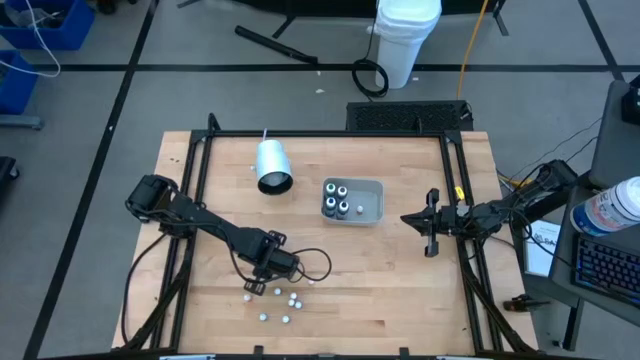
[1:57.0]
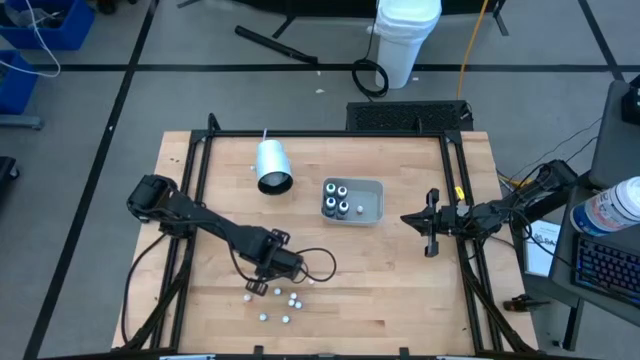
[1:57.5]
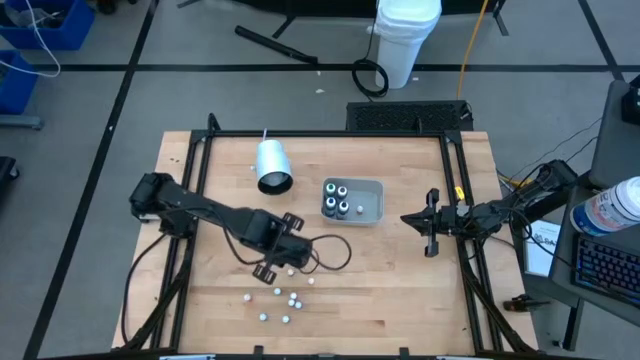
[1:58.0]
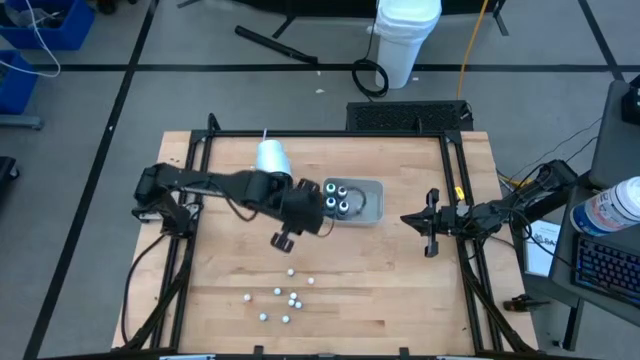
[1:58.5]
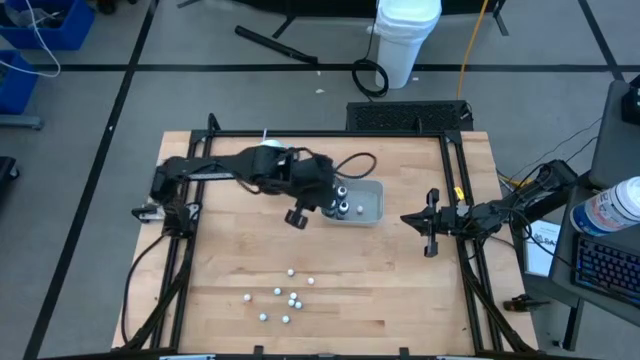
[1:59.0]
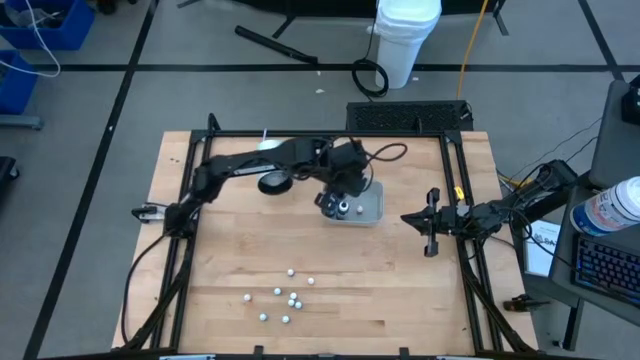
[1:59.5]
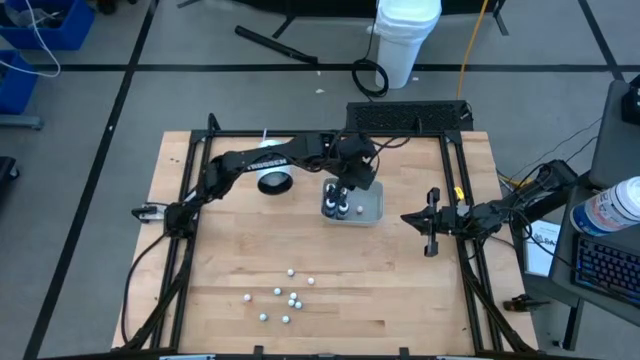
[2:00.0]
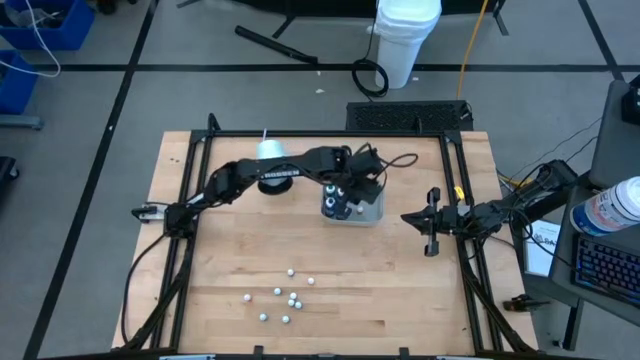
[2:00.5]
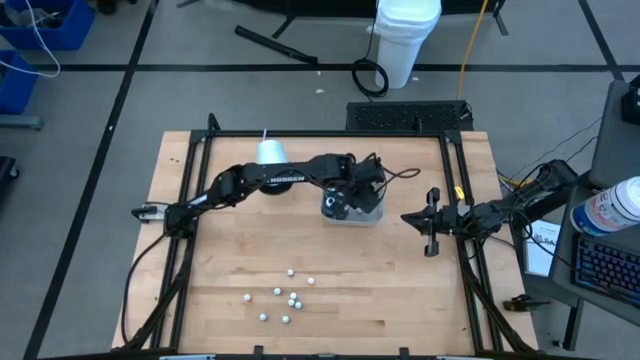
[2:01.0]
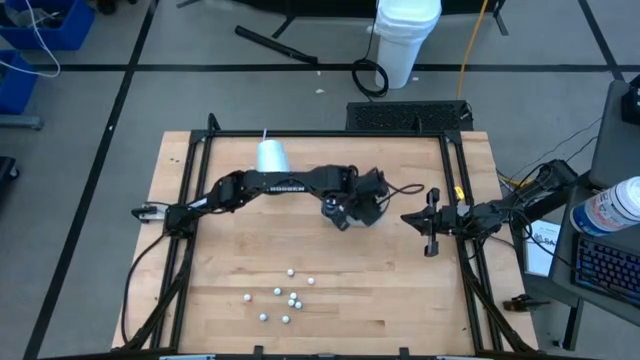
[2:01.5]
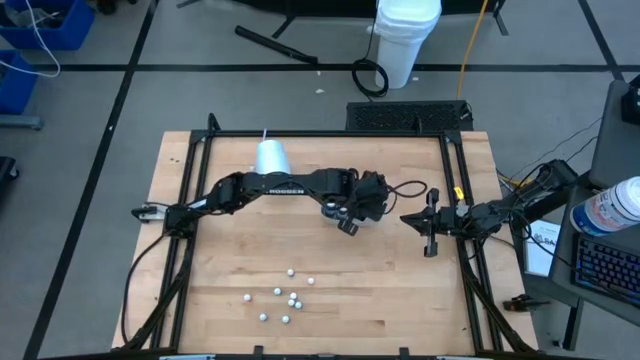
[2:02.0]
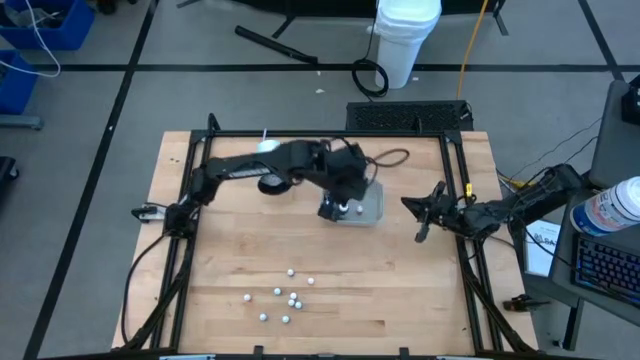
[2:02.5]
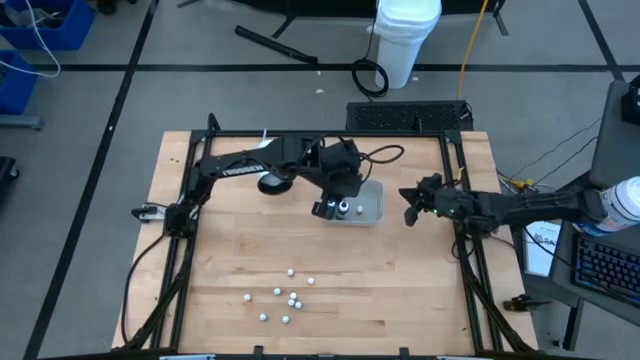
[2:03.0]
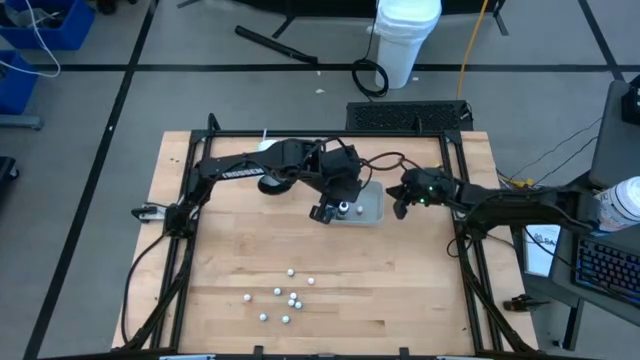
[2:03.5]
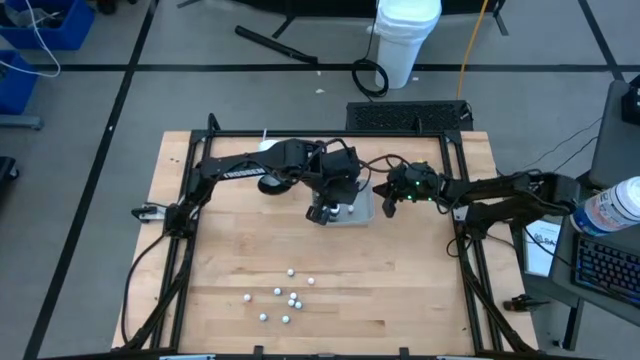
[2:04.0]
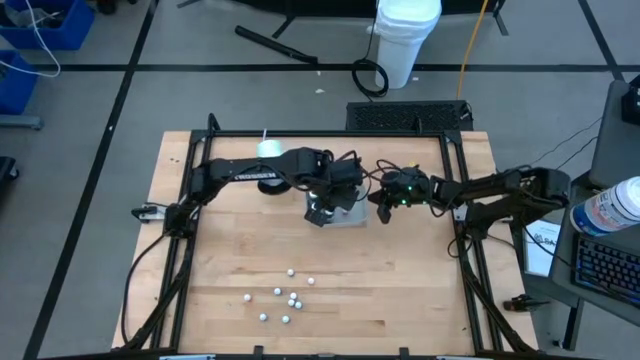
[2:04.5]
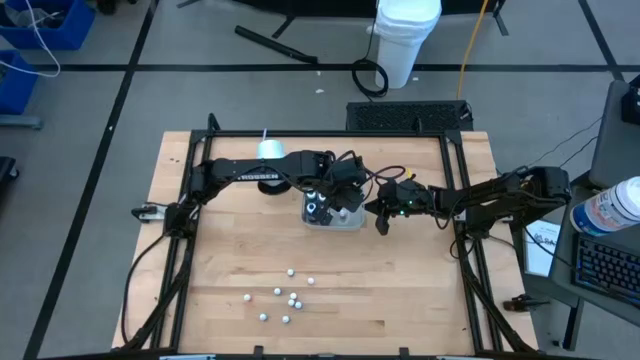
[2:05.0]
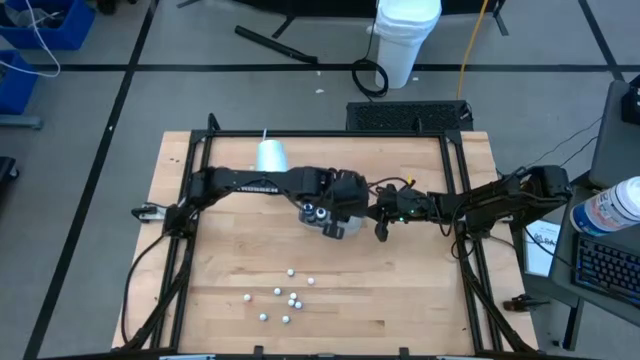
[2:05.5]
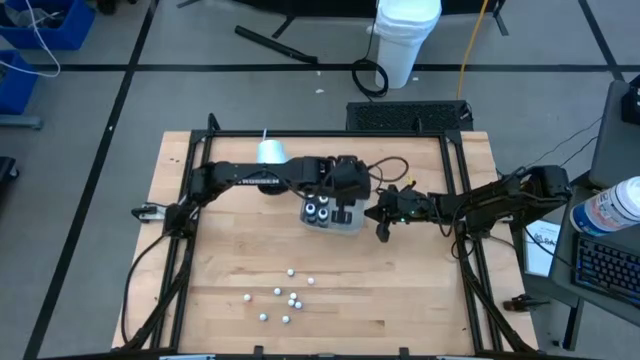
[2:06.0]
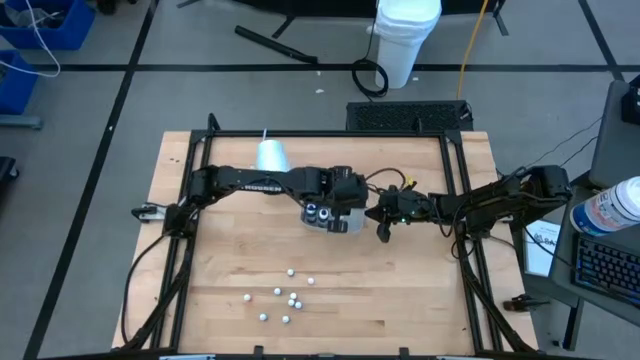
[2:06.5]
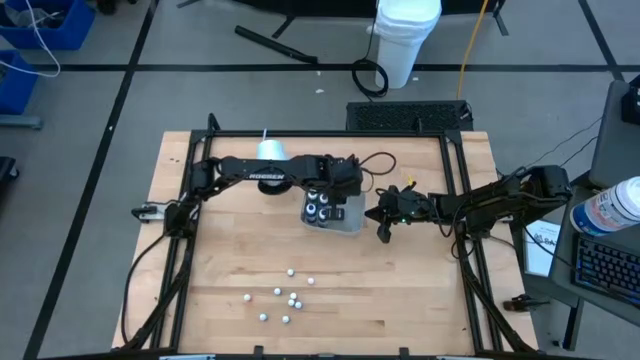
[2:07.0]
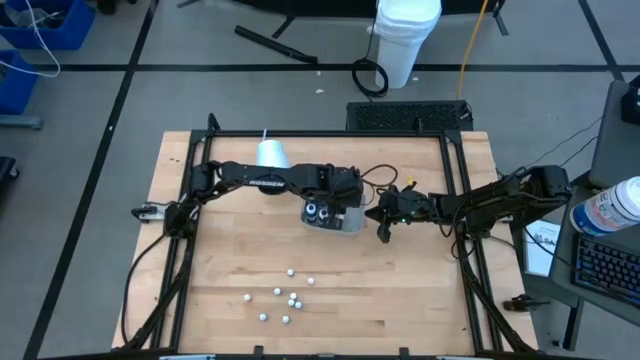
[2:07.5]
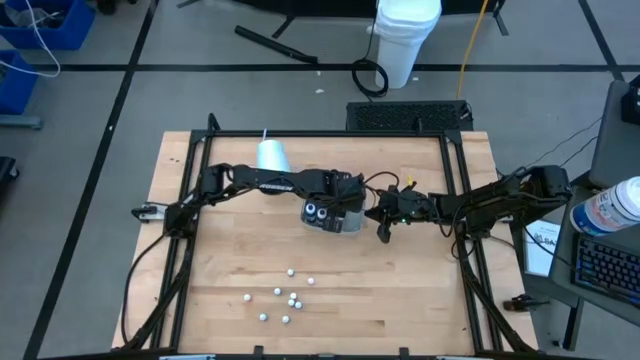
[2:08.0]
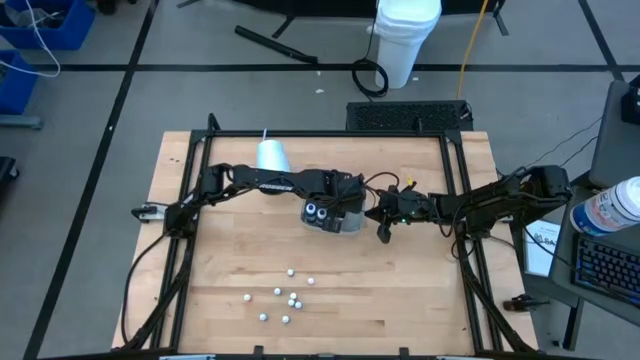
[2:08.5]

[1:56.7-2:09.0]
Task: Pick & Place food coloring
Put the blue food coloring bottle into the gray bin
